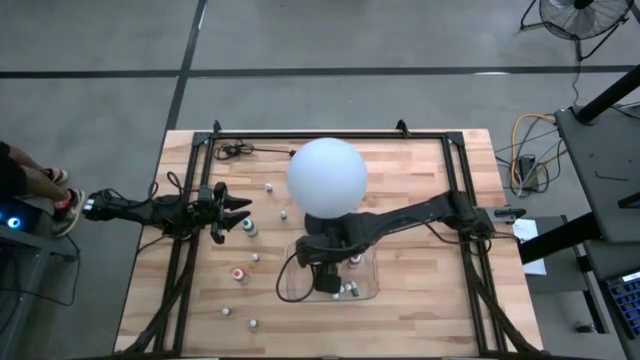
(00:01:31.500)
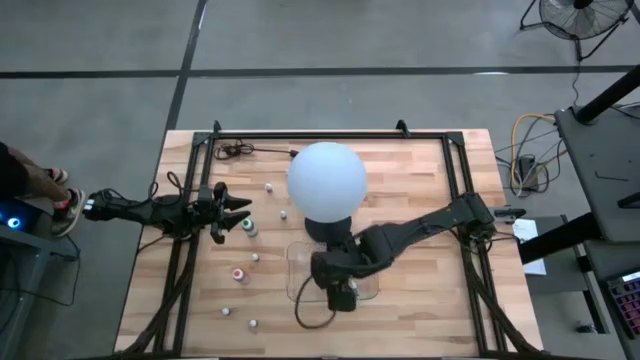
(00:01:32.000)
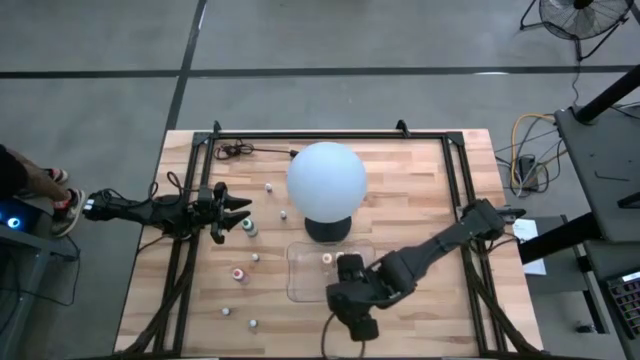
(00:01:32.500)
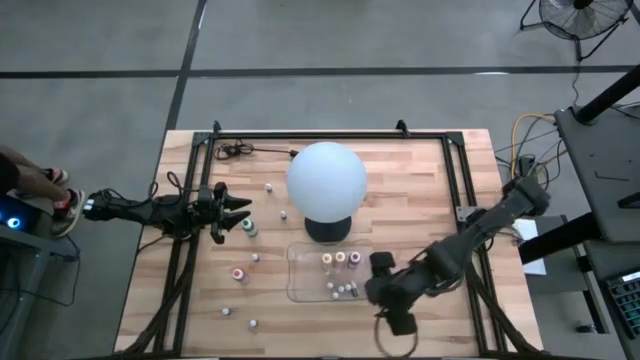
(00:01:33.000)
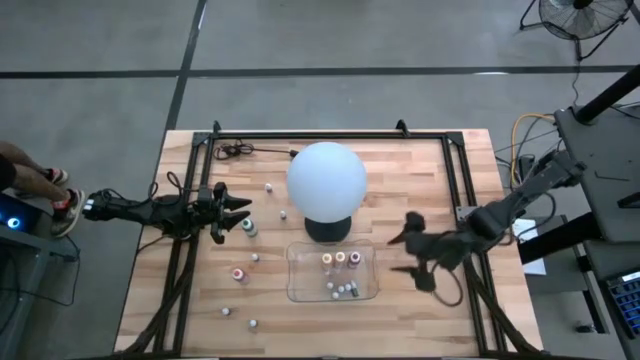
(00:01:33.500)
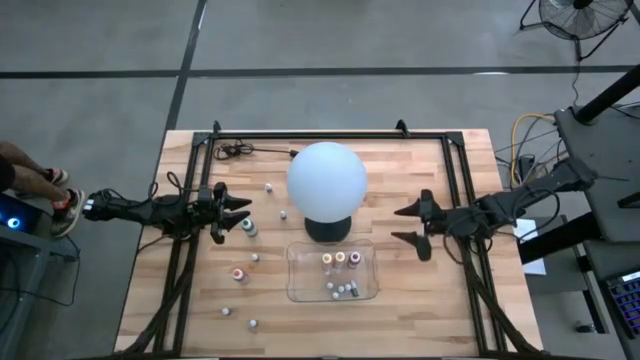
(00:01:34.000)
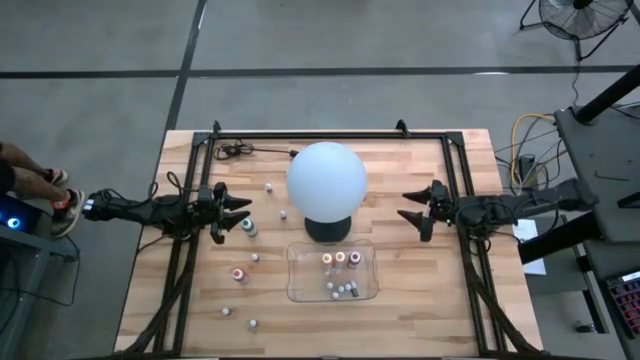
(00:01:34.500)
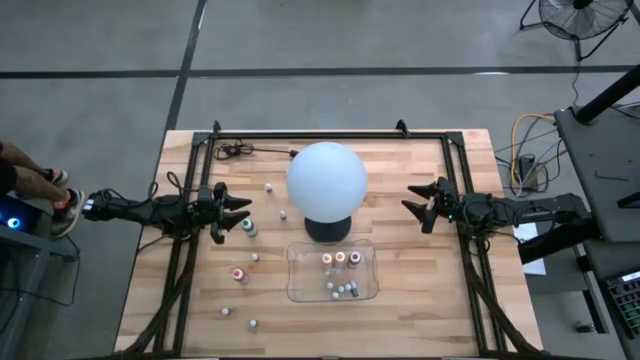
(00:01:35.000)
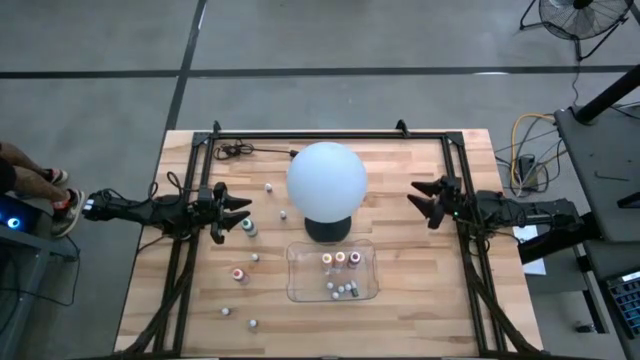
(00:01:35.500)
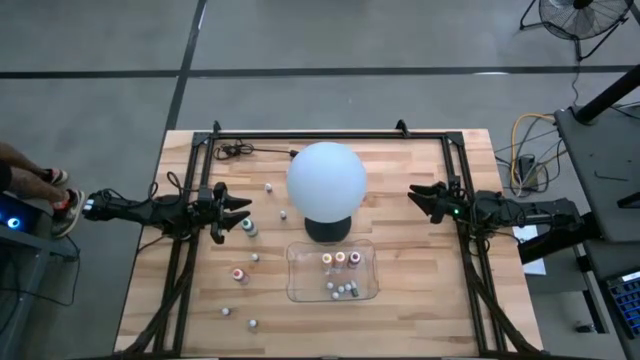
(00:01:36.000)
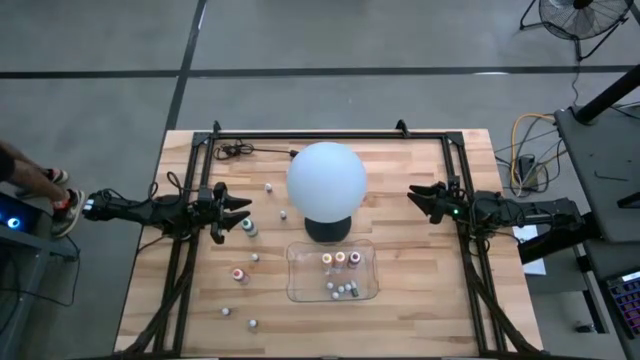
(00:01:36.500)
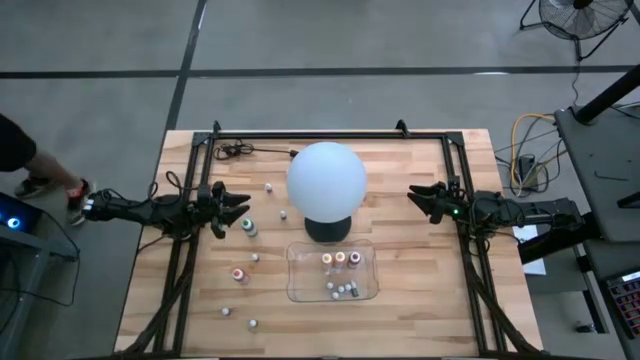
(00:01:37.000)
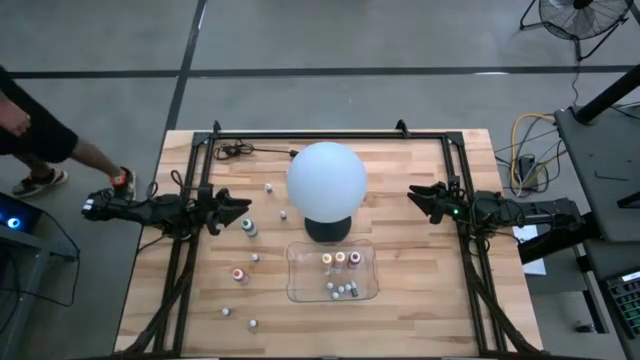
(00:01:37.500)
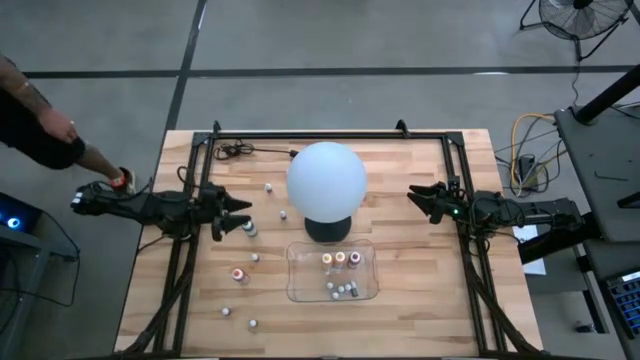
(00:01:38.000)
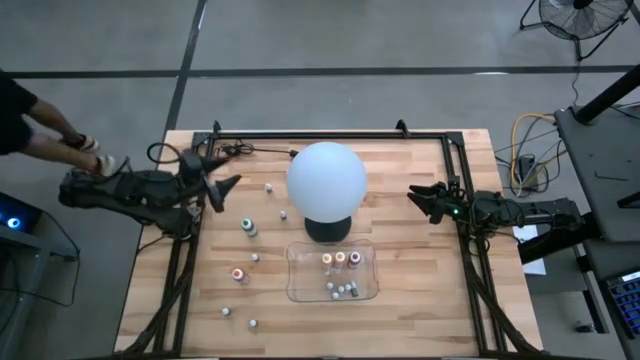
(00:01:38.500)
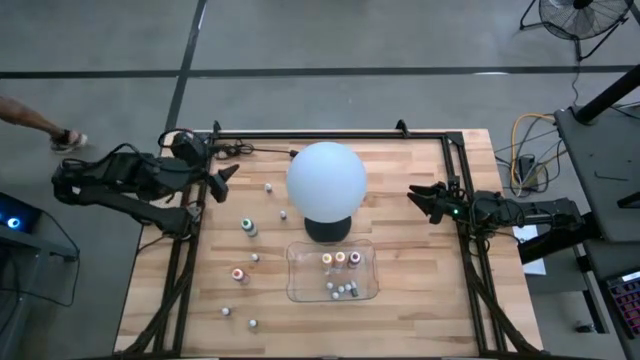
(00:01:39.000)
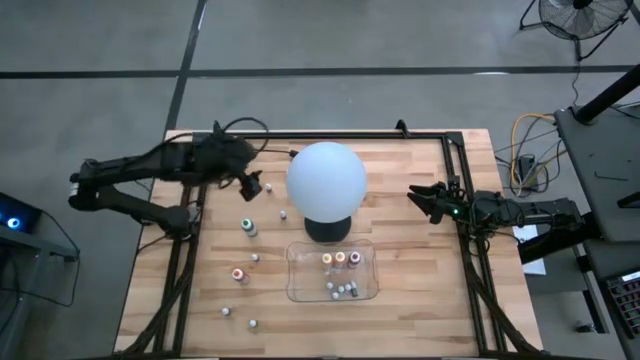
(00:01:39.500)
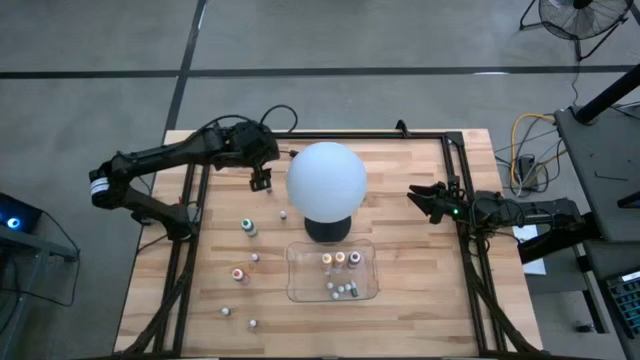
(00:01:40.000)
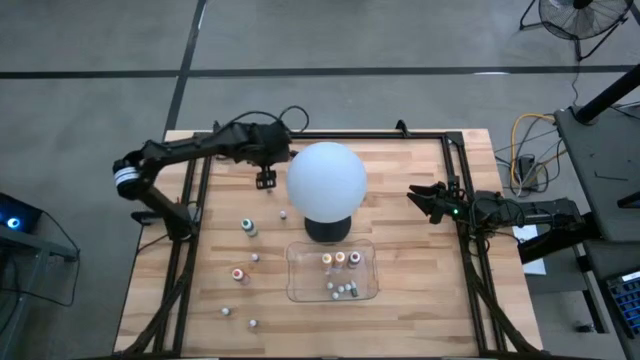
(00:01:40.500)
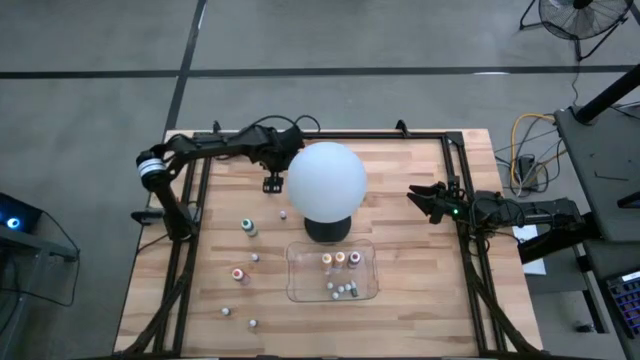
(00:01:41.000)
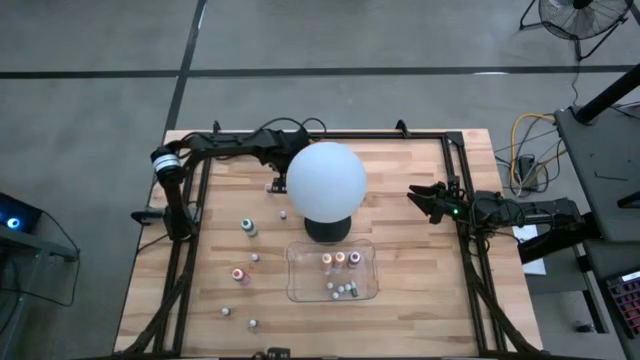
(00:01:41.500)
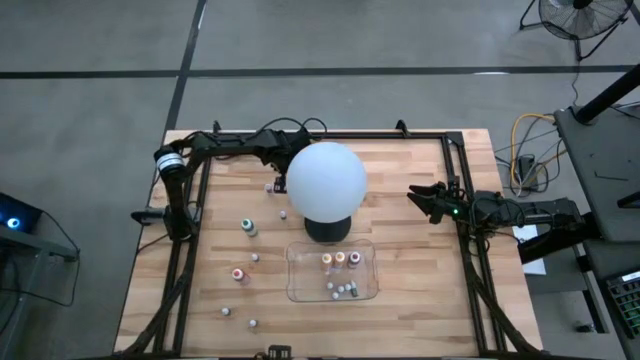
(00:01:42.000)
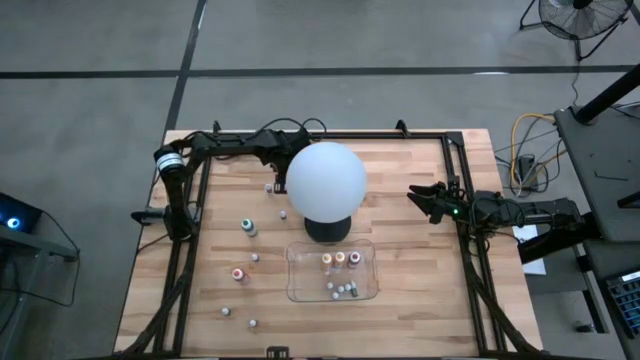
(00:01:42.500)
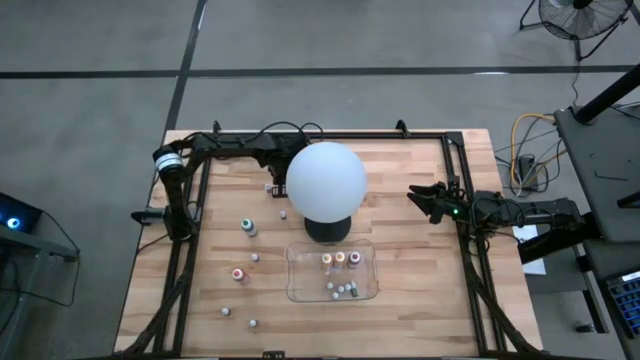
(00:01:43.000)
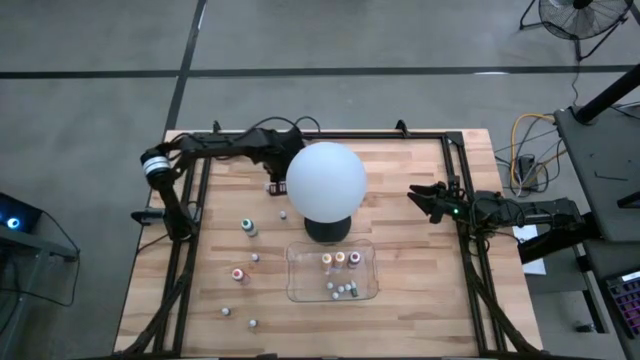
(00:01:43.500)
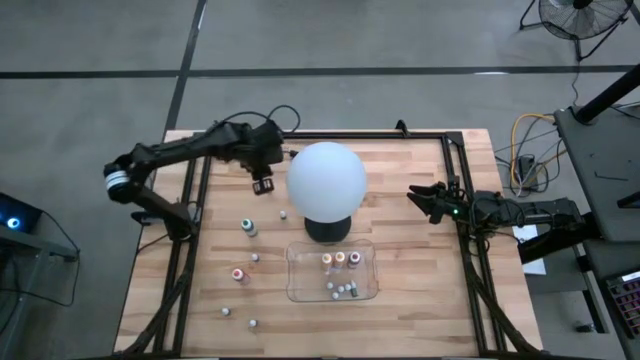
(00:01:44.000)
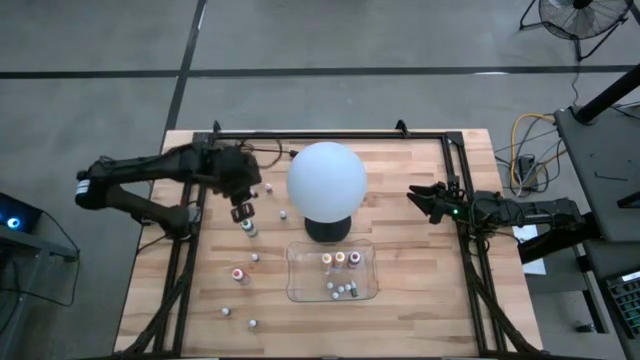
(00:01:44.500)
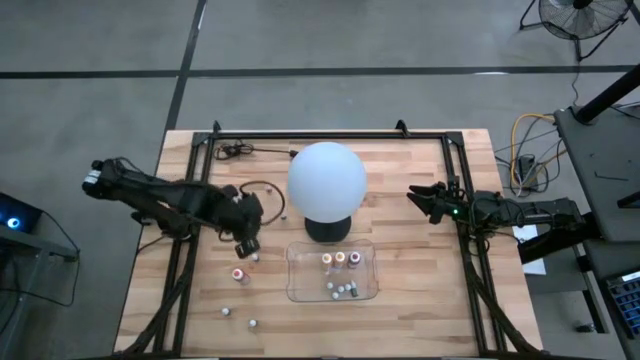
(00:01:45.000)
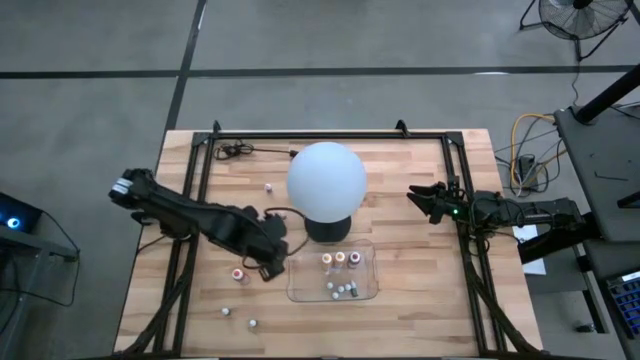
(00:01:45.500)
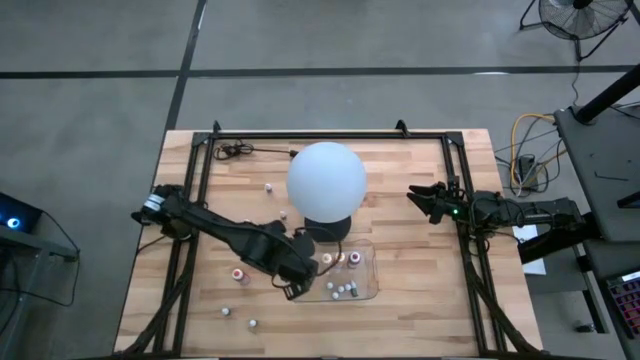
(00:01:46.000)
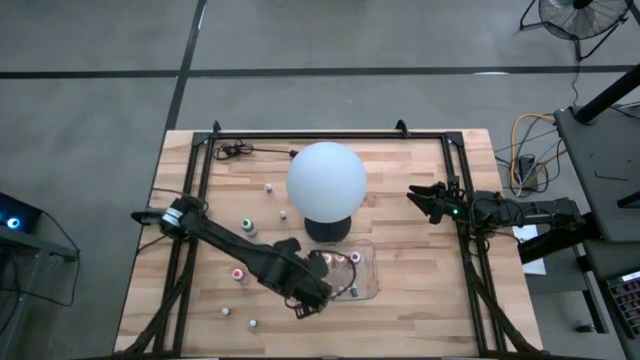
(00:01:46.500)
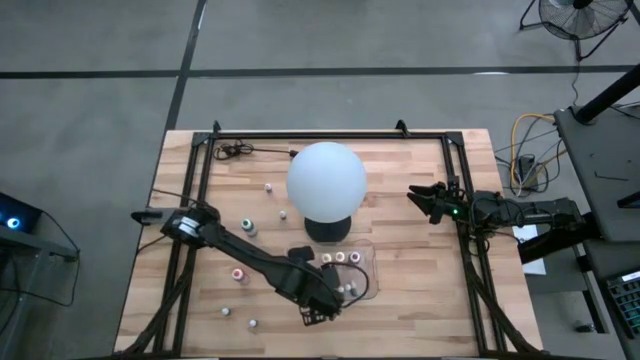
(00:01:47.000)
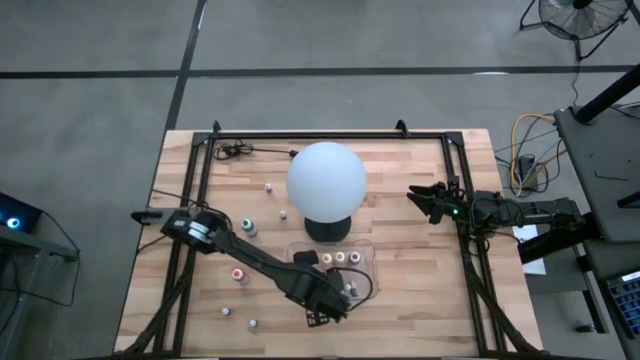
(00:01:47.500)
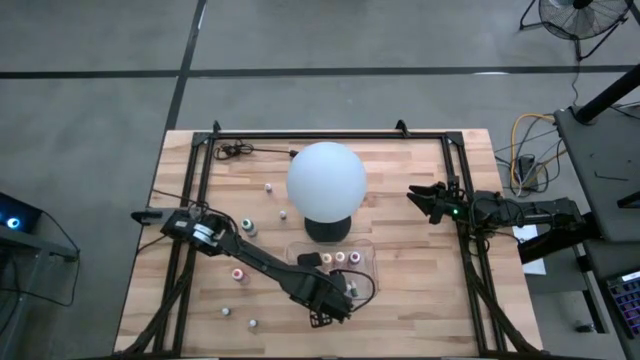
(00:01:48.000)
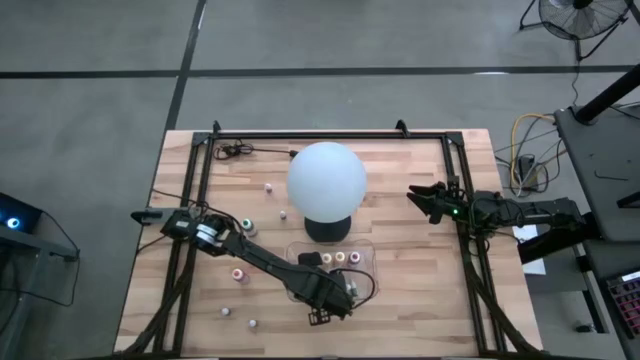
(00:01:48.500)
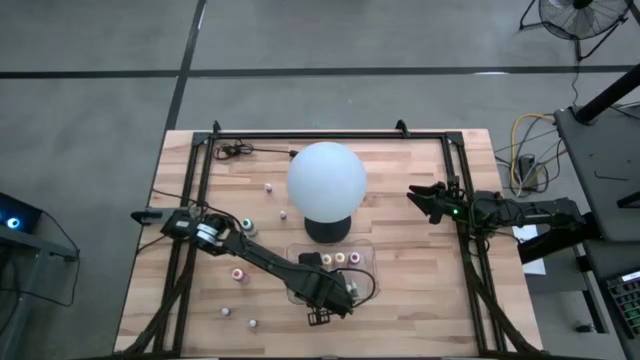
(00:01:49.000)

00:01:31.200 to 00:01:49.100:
Task: Pick & Place food coloring
Put the small black food coloring bottle into the transparent bin
